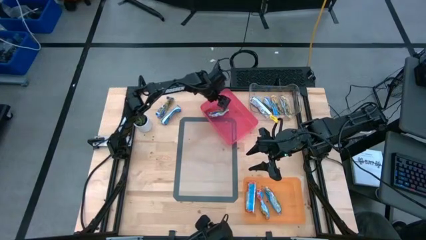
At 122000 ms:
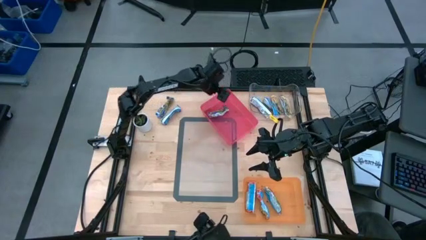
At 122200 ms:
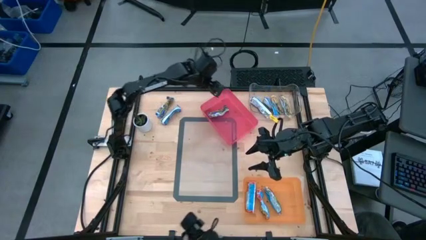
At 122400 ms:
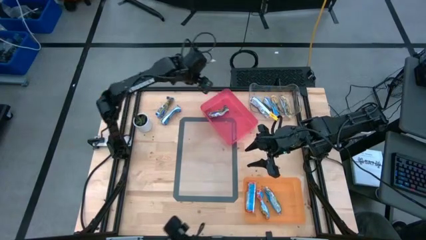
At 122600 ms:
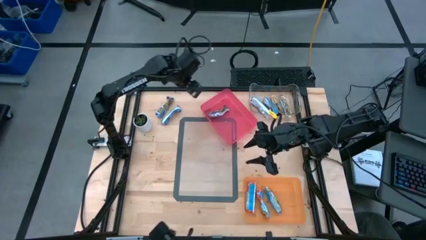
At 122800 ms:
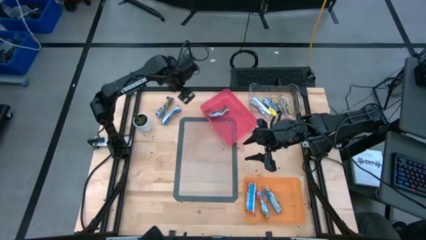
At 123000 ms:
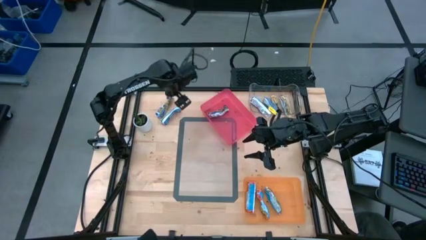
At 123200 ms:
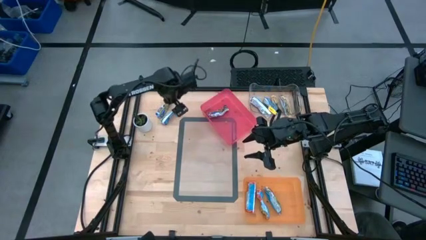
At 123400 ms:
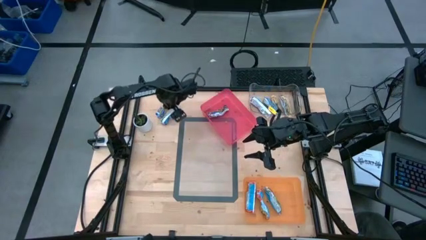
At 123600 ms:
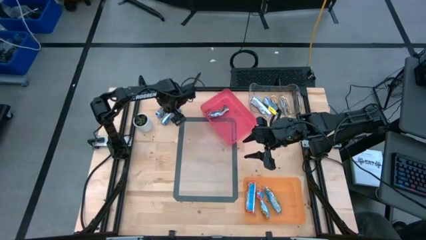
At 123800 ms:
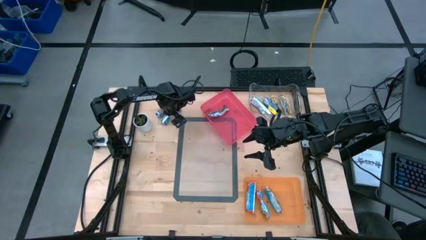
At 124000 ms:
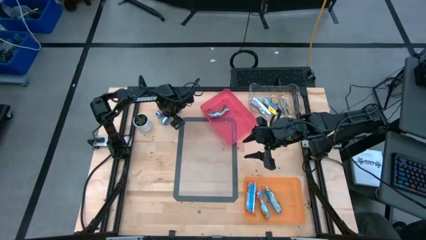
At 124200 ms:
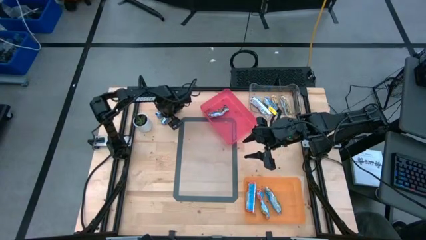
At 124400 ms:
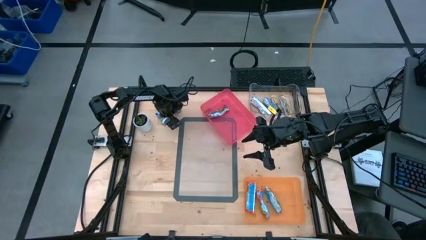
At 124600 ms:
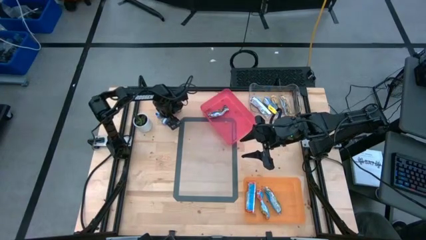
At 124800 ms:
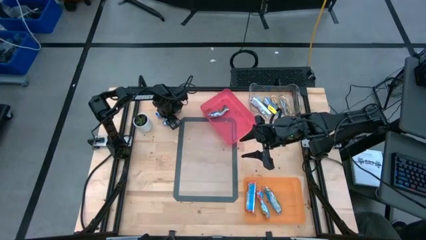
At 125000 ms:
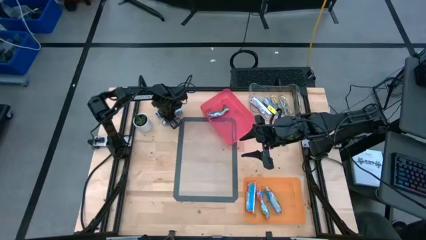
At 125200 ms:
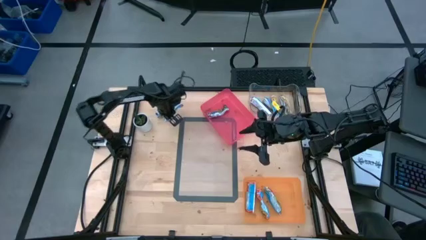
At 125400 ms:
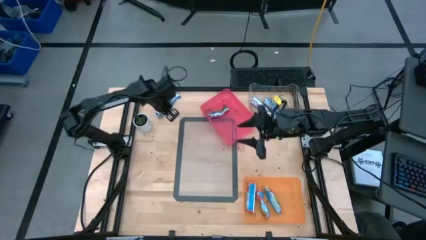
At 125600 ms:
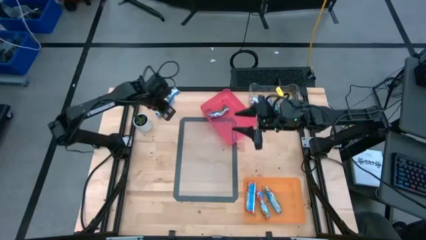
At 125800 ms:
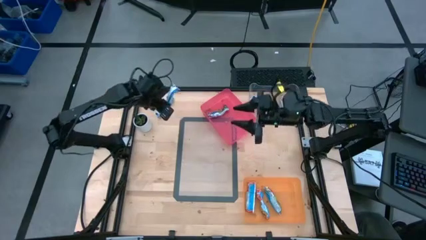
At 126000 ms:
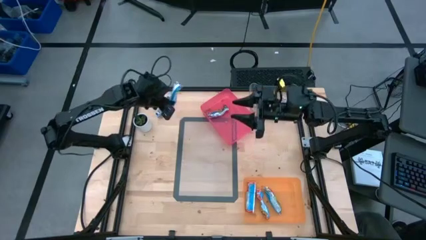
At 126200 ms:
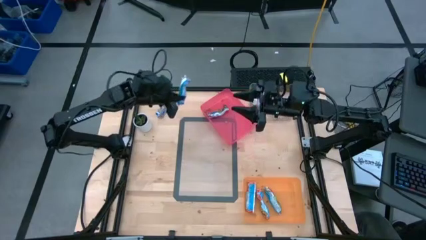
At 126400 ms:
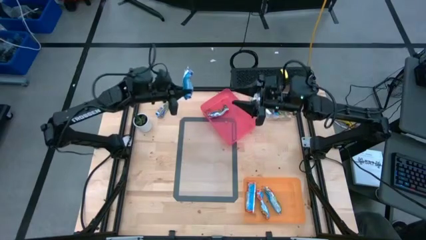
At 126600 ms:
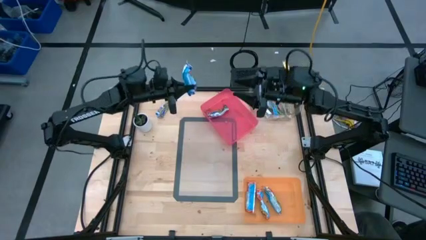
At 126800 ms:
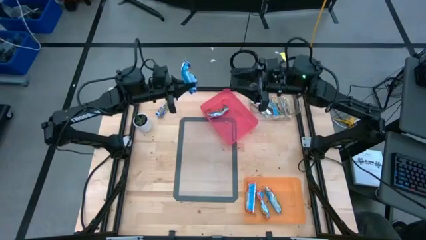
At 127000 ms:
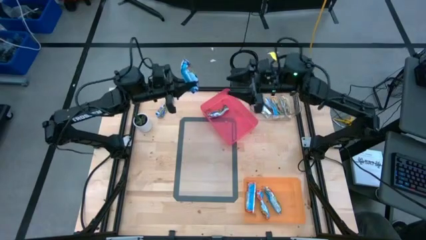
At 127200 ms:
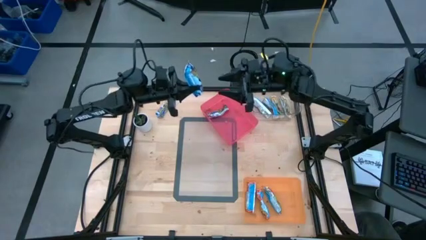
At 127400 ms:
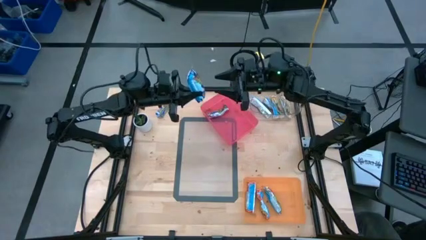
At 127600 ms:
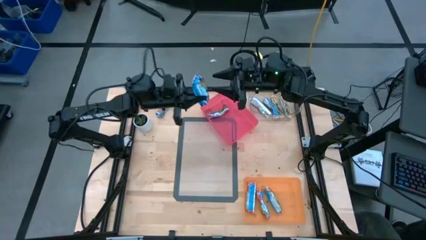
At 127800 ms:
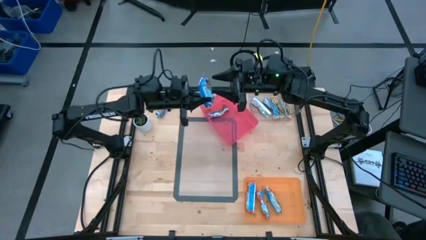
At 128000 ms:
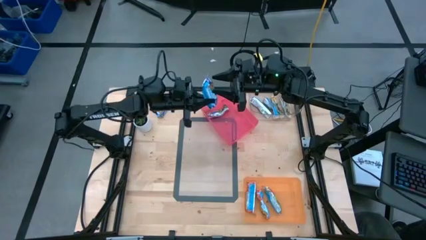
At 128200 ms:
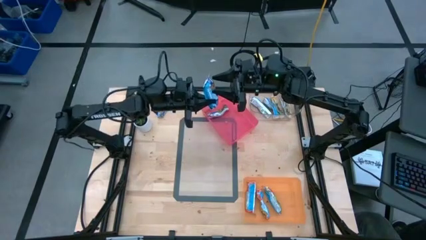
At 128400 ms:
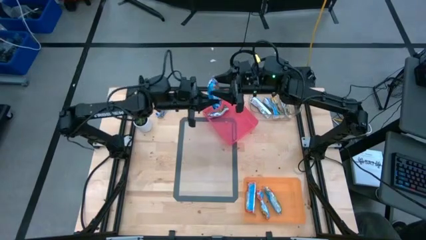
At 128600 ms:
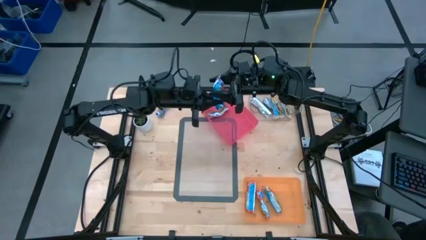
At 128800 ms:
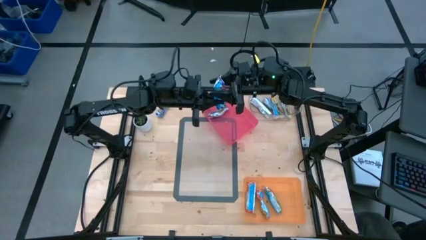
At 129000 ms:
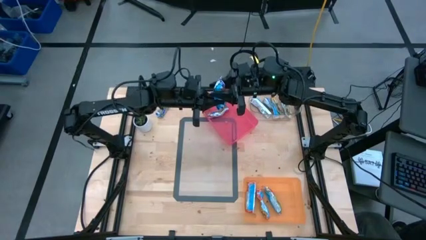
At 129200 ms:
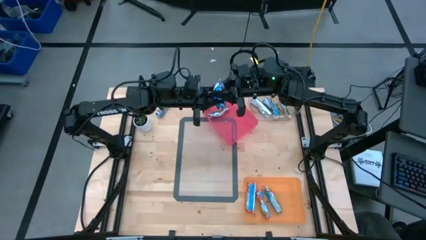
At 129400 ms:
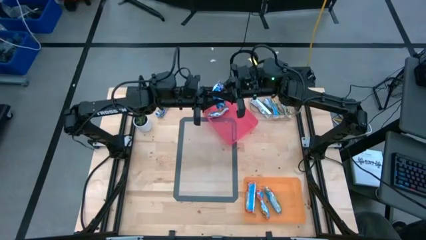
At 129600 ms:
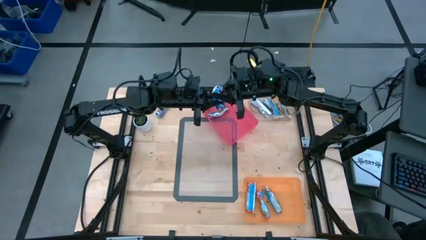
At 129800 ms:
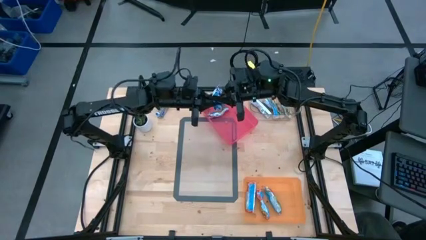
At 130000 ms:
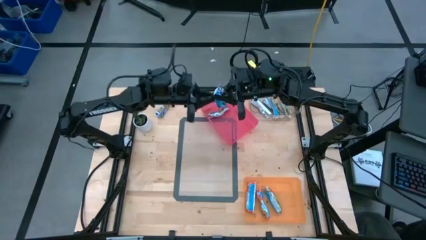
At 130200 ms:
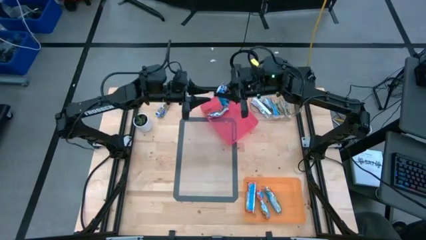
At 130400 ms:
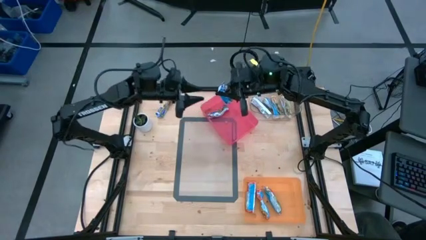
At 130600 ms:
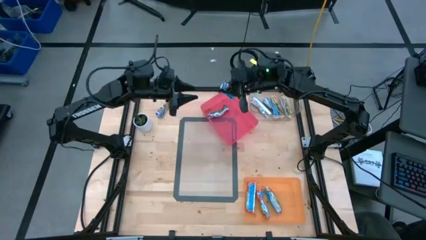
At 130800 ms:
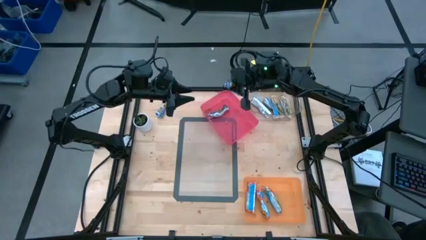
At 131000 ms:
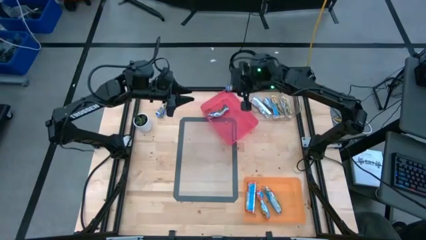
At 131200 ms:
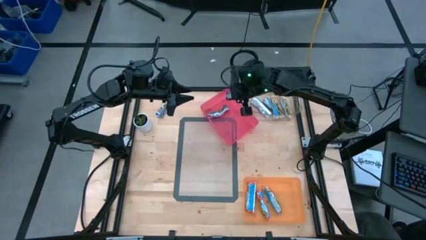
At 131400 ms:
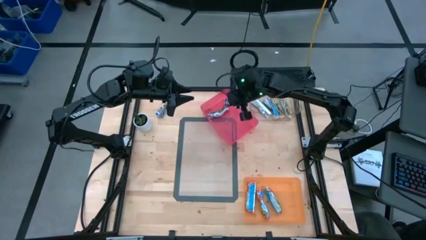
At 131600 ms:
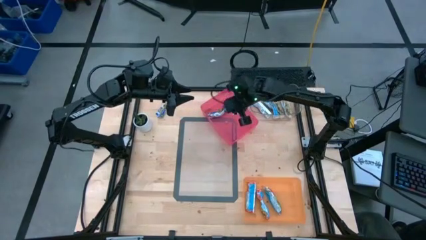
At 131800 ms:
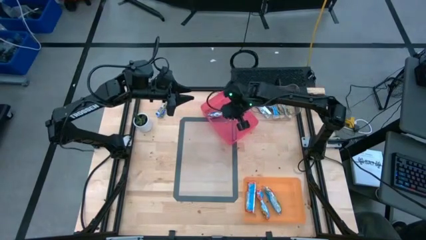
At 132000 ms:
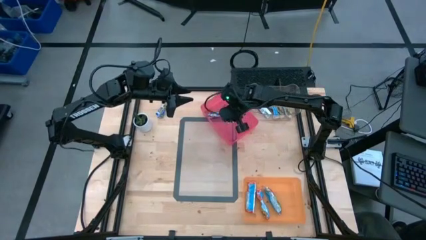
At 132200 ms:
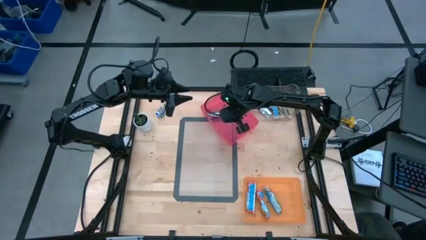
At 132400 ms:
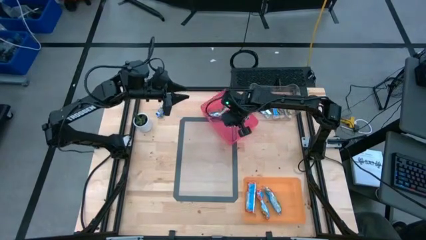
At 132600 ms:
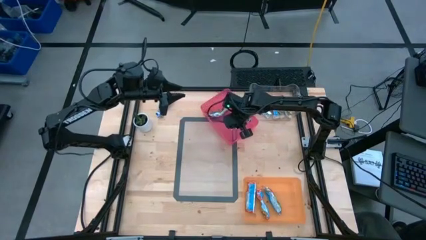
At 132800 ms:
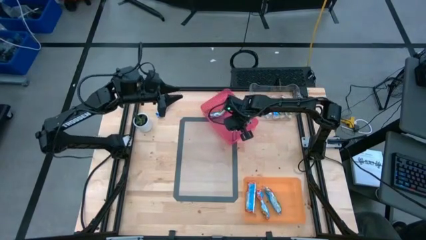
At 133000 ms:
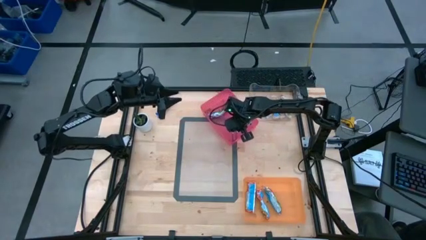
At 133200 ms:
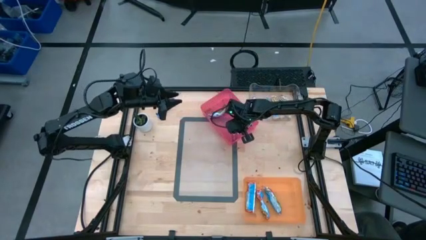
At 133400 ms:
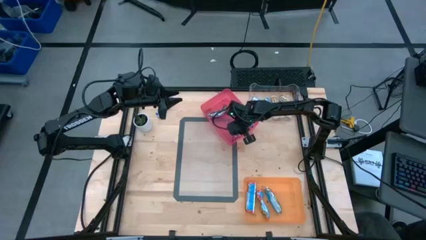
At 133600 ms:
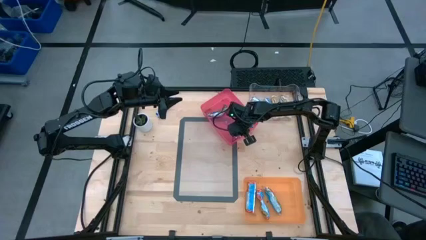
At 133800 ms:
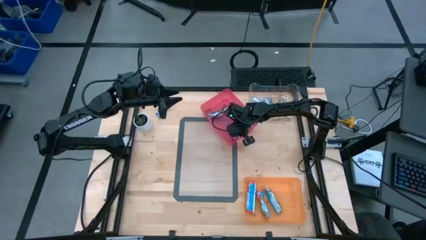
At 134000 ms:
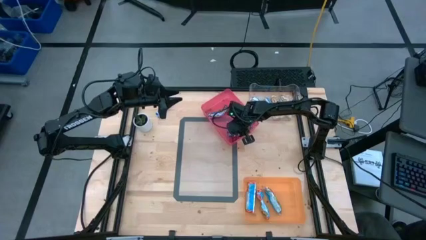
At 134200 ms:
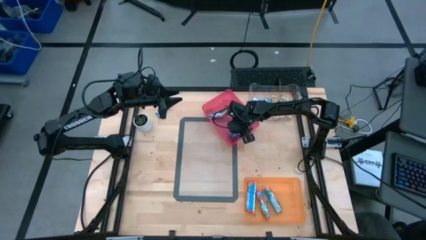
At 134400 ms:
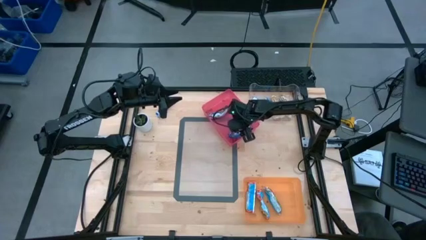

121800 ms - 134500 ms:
Task: Pick and place Granola Bars by type
Put the blue granola bar into the pink bin
